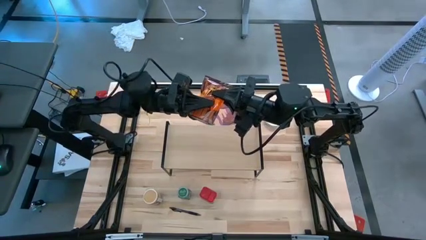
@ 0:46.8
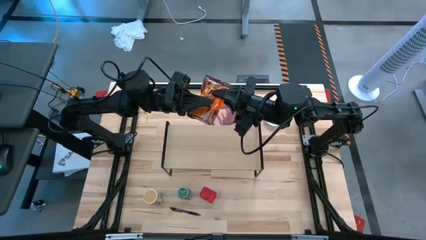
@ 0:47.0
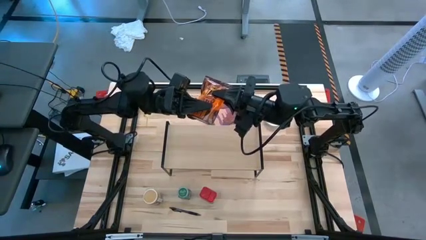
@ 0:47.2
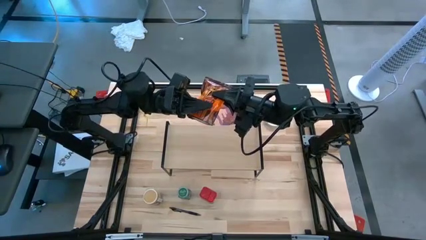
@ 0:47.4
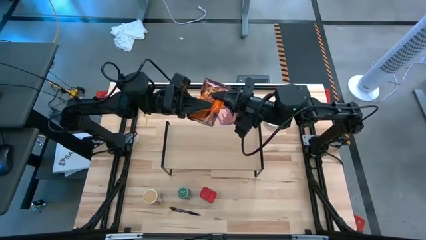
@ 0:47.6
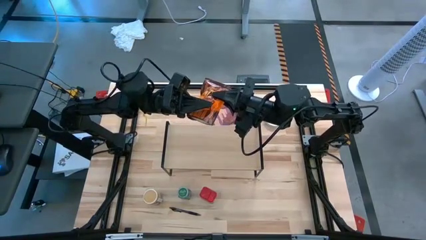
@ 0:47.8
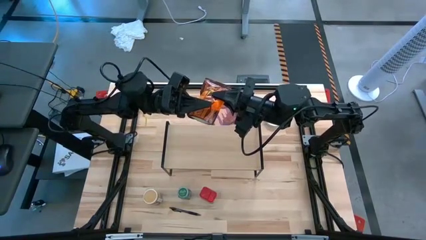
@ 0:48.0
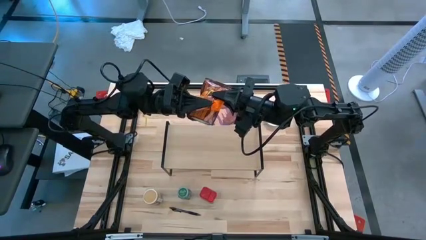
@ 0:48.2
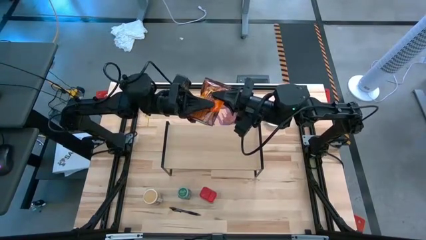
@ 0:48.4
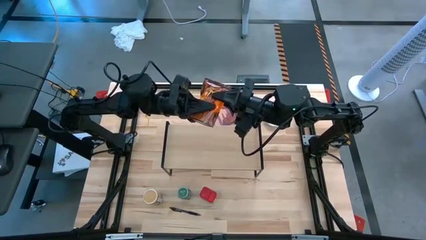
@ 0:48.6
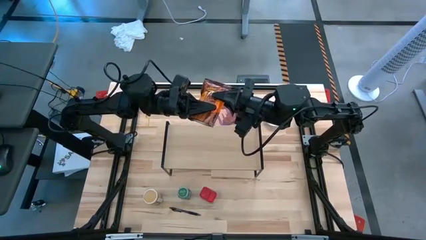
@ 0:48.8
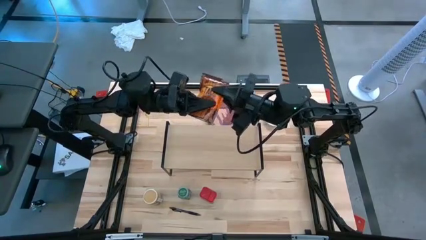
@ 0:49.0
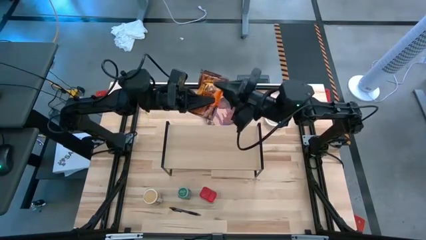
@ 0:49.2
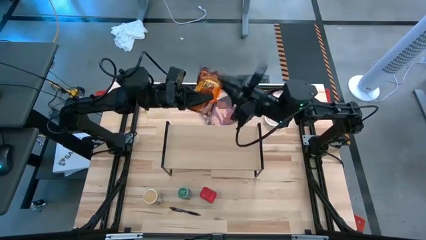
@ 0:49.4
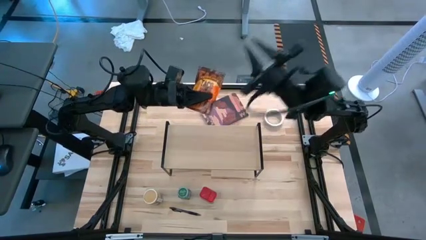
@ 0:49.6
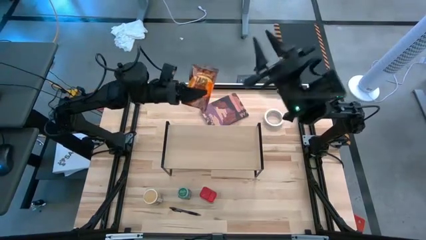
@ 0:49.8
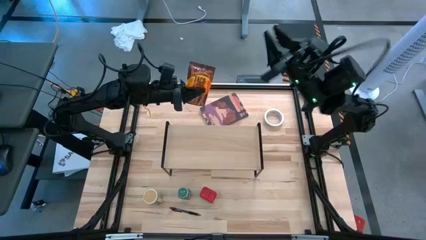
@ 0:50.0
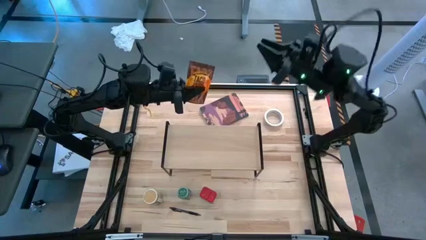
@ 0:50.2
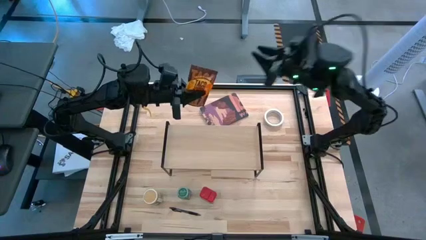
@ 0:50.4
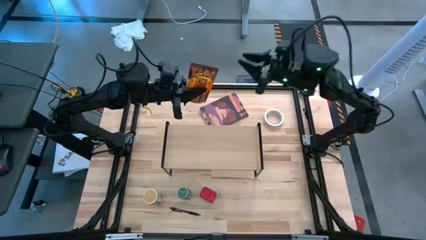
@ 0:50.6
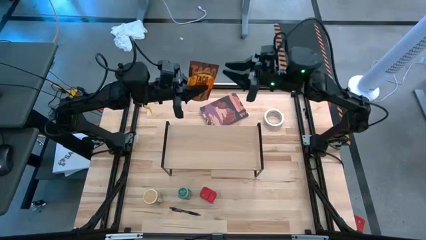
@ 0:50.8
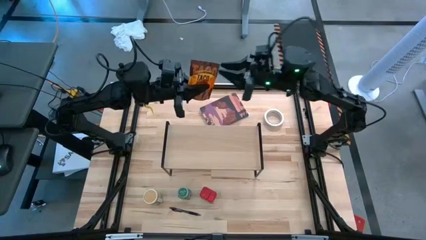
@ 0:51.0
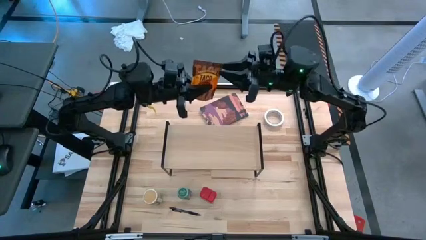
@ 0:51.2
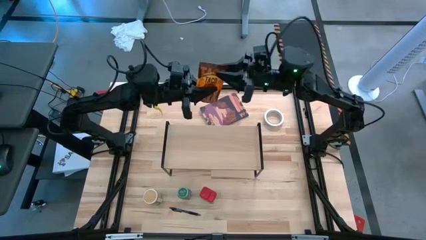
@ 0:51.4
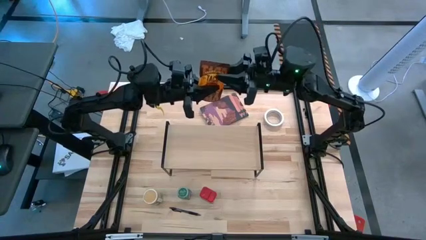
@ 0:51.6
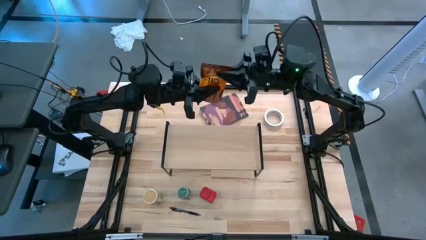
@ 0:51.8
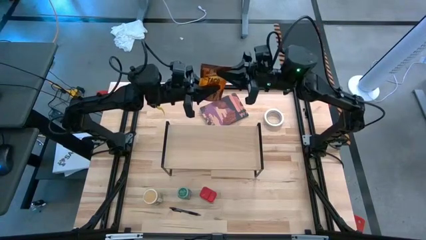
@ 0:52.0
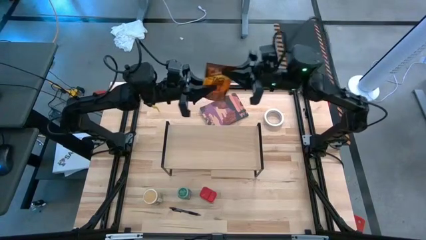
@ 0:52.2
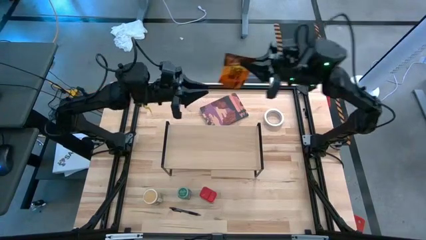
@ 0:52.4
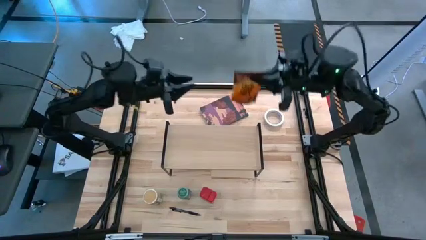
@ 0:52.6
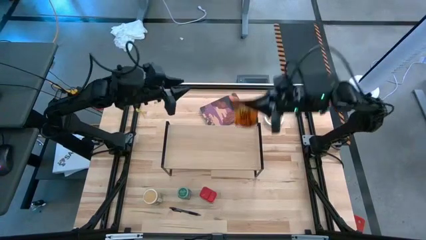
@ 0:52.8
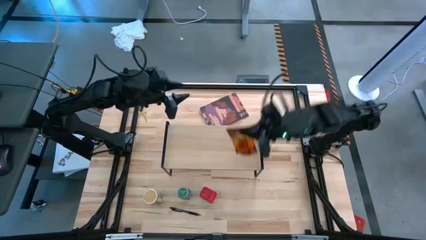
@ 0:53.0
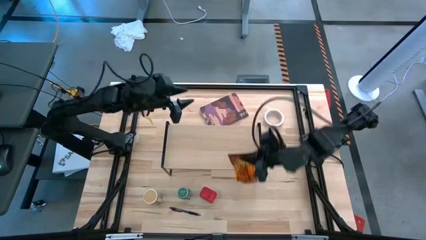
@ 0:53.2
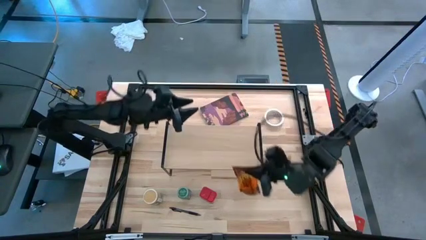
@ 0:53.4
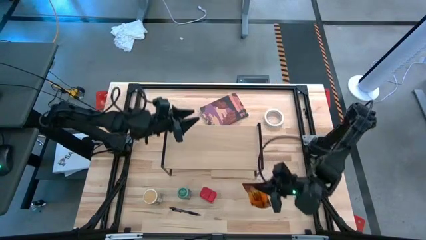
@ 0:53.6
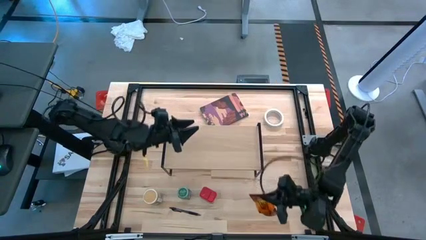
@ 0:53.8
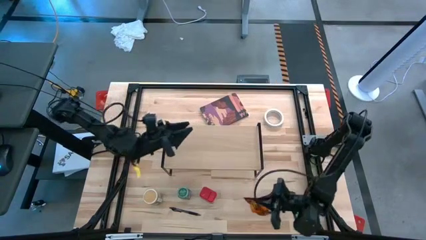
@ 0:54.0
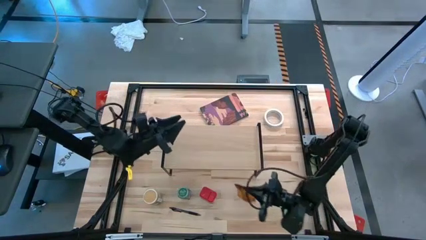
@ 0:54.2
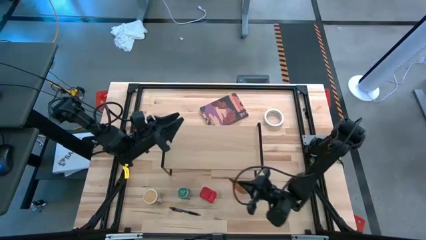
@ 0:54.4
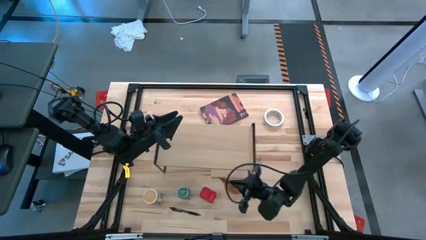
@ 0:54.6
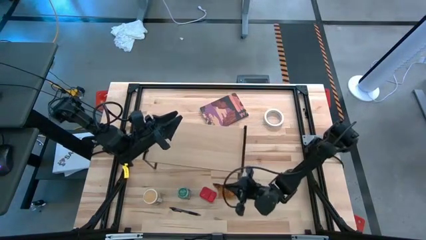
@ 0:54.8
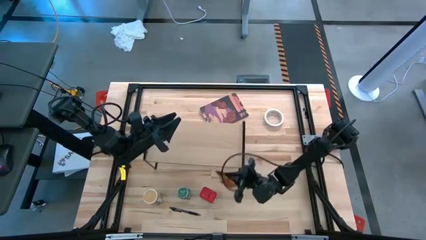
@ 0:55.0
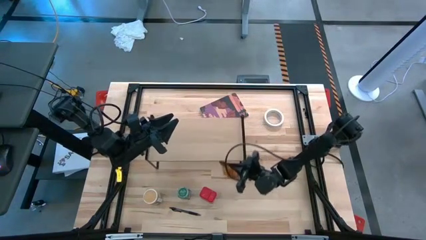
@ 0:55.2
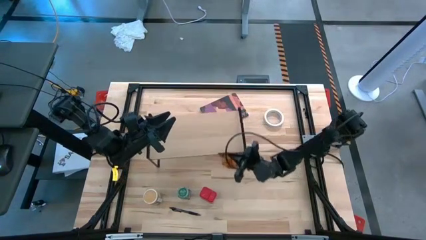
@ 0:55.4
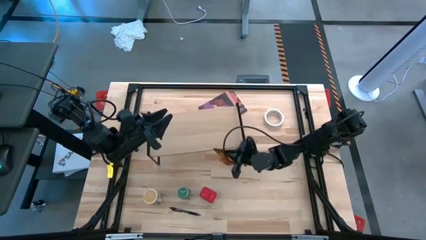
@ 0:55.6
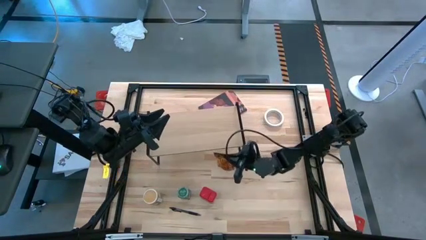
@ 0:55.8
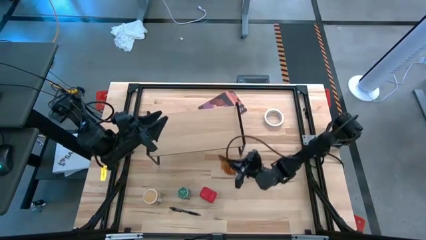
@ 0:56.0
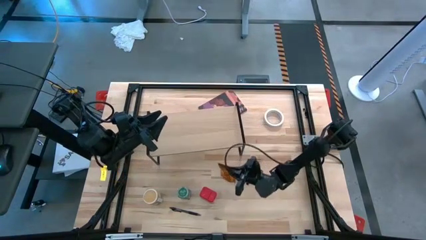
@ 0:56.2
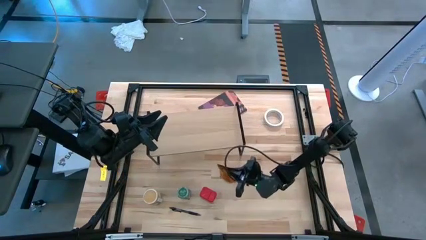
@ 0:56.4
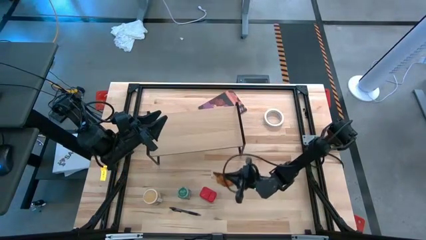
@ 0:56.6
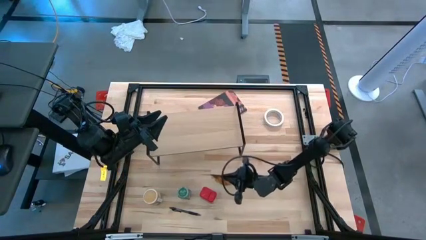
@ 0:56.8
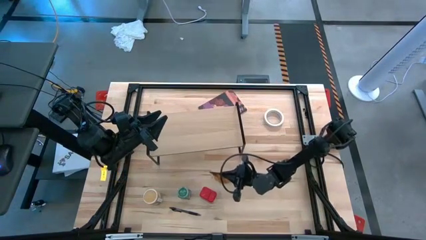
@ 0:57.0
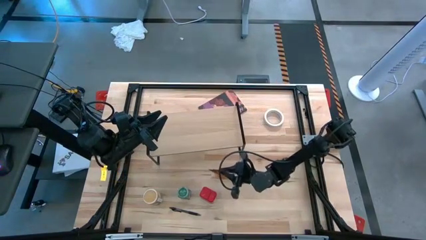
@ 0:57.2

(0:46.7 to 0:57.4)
Task: Shelf spices
Remove the orange seasoning pack from the shelf

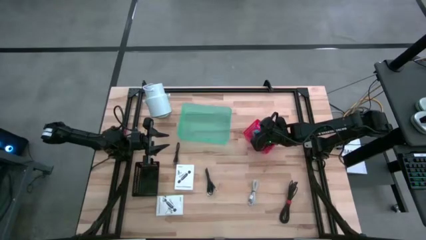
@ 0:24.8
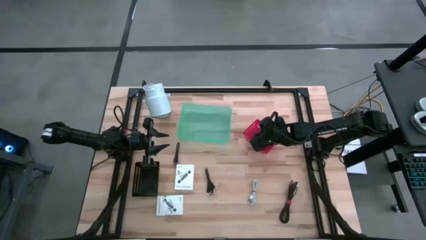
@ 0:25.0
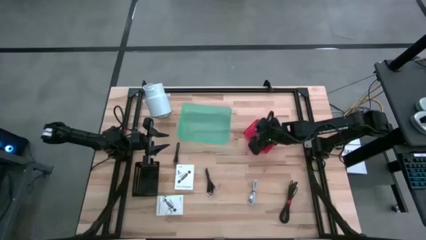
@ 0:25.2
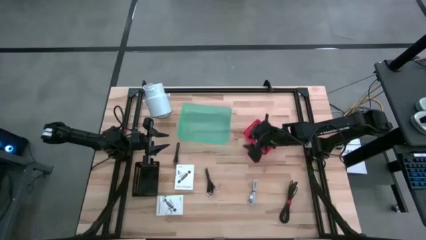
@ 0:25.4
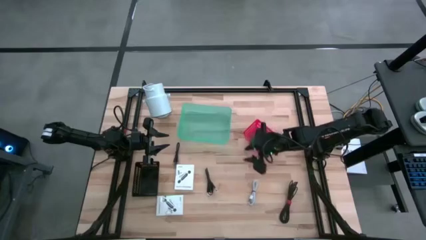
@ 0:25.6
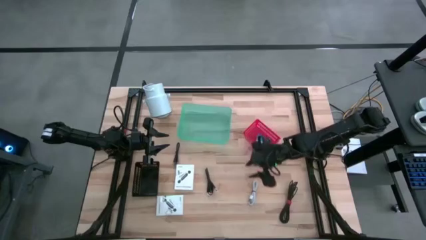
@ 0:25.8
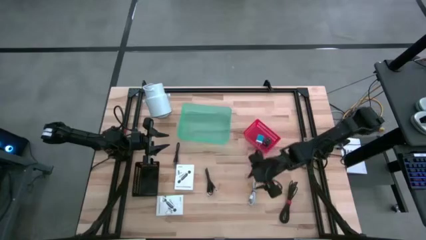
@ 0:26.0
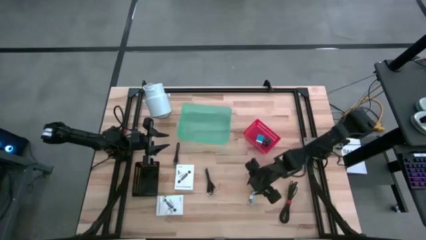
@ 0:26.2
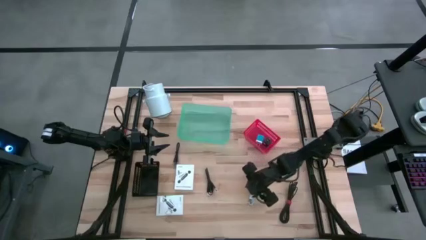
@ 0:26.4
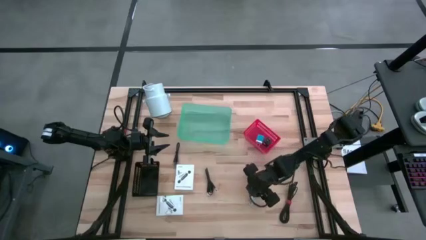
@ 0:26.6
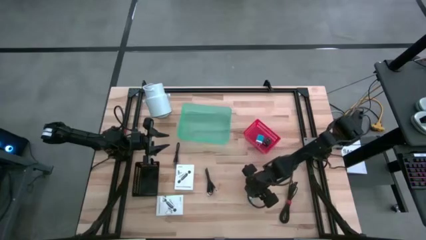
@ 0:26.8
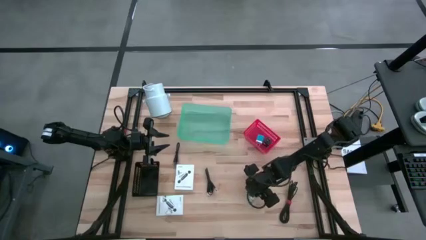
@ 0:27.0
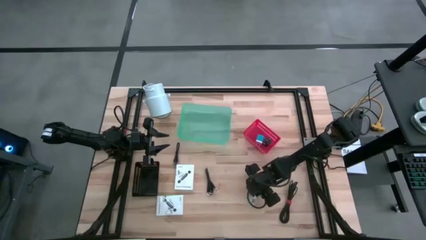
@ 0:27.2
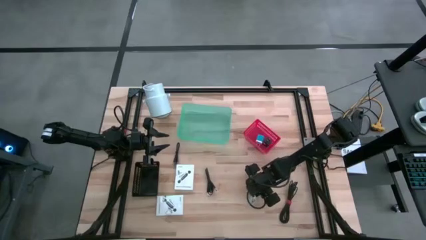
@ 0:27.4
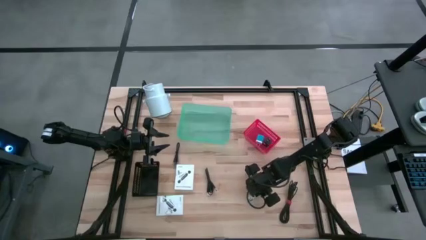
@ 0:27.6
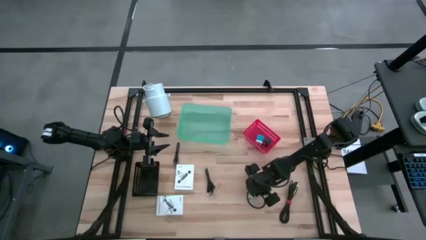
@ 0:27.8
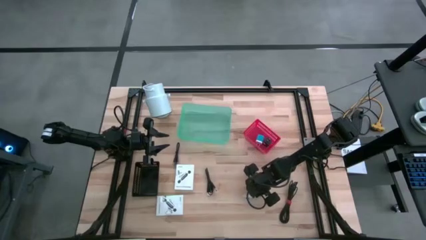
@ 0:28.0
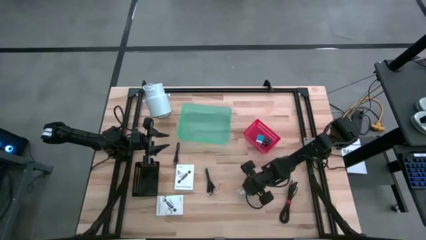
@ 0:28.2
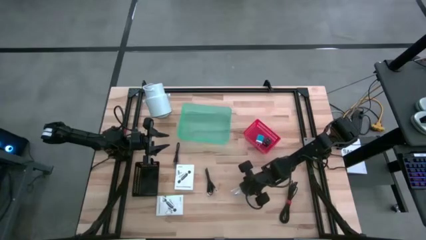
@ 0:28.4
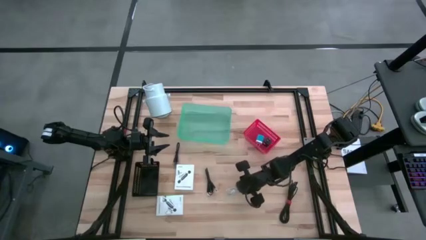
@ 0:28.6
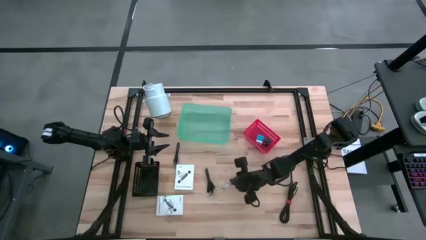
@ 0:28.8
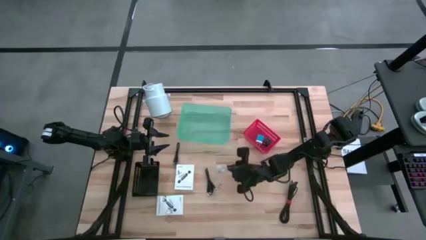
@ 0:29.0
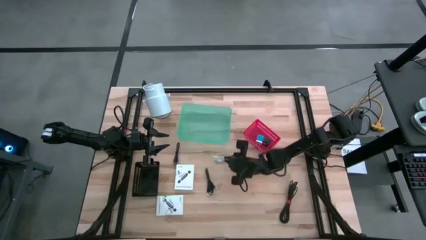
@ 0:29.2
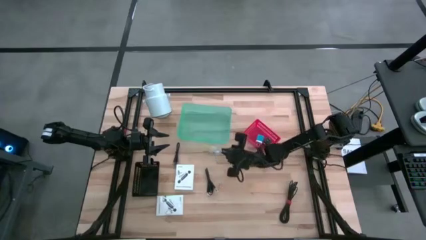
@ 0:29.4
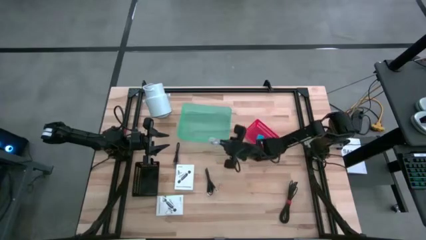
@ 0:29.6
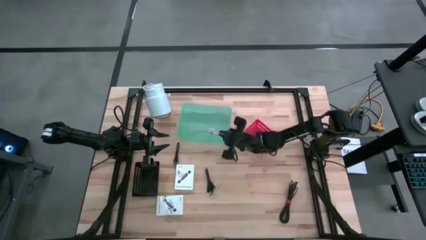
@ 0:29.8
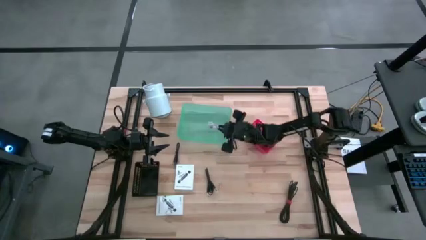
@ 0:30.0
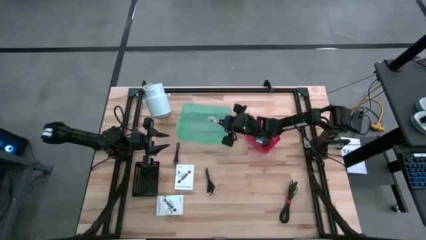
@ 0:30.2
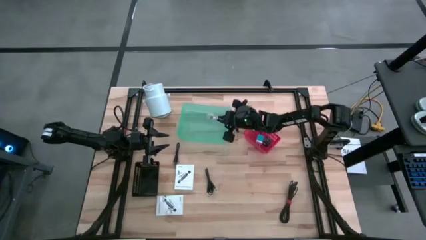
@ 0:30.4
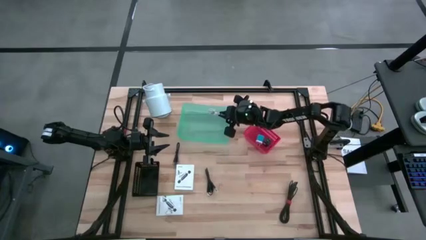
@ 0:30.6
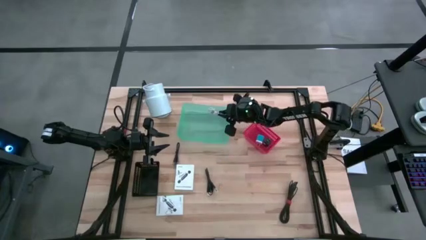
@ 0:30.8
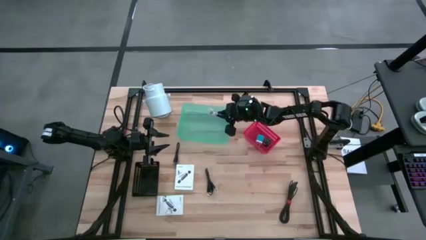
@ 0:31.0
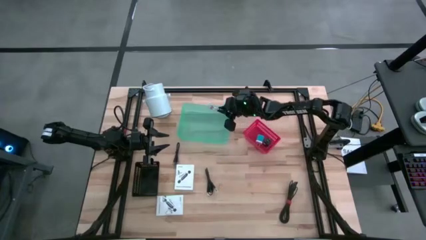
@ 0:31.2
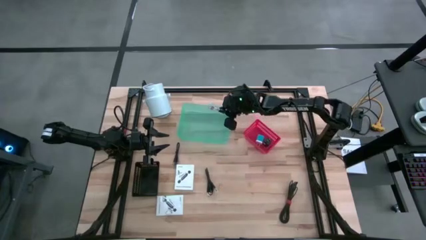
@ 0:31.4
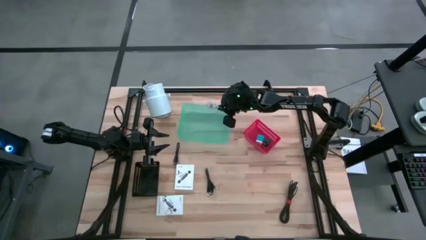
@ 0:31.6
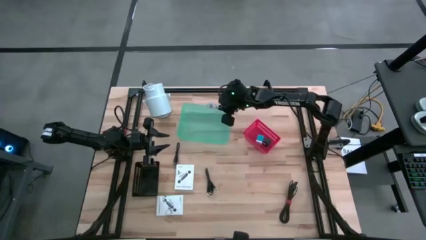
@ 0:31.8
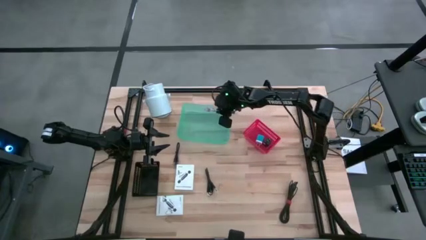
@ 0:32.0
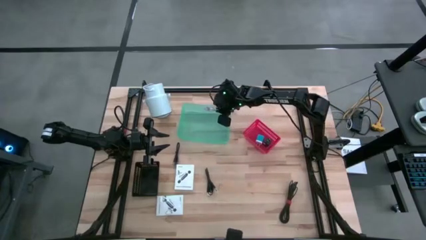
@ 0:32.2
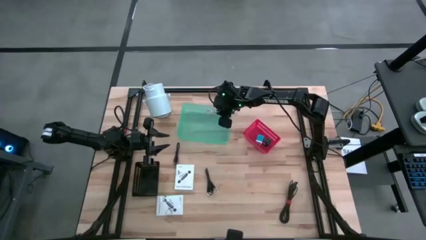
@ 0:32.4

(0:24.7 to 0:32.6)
Task: Pick and place items into bin
Put the white charger cable into the transparent green bin
